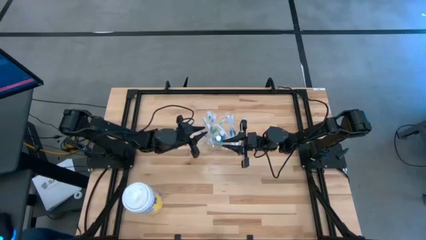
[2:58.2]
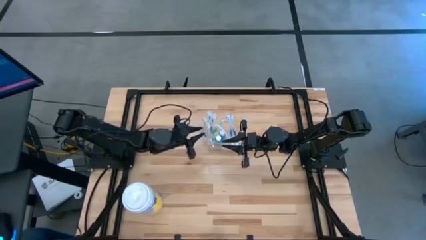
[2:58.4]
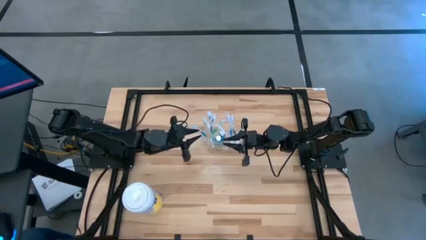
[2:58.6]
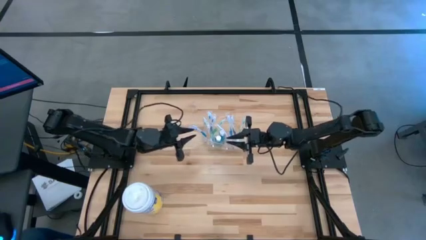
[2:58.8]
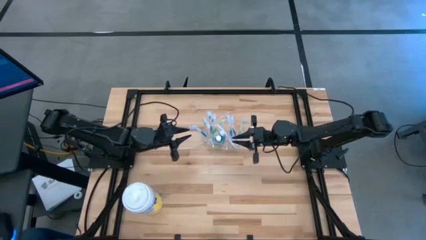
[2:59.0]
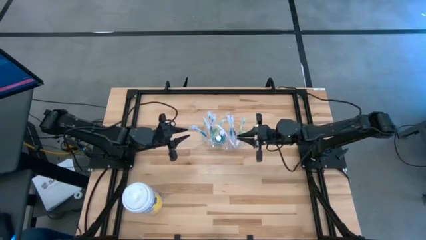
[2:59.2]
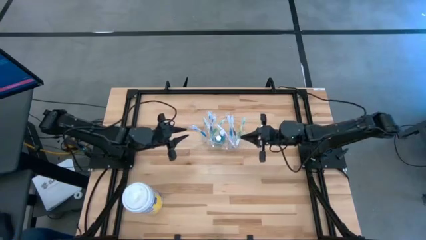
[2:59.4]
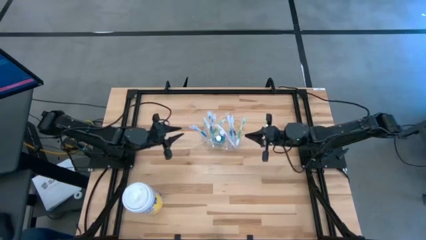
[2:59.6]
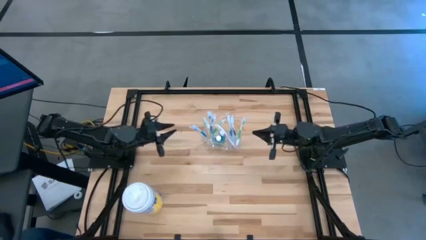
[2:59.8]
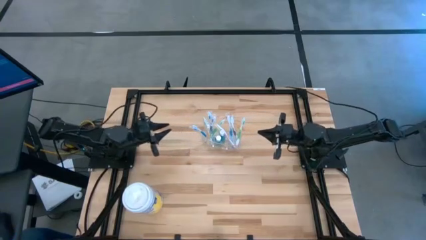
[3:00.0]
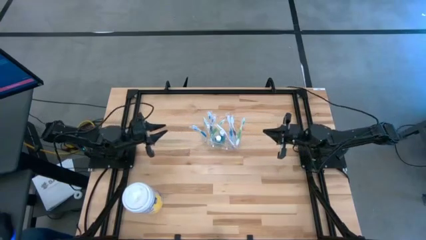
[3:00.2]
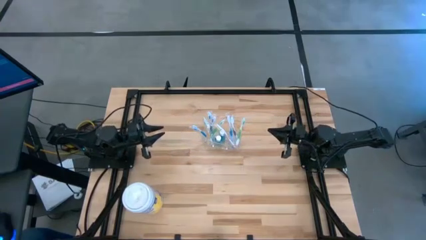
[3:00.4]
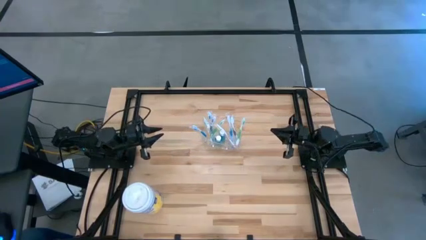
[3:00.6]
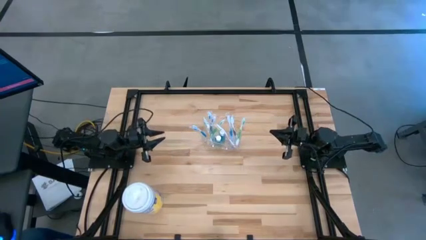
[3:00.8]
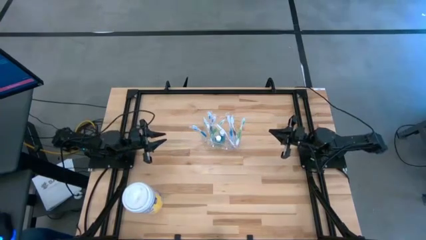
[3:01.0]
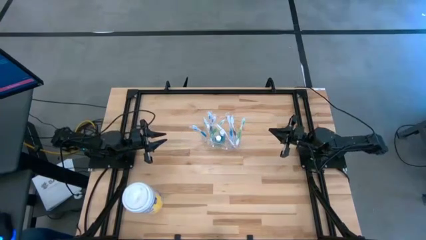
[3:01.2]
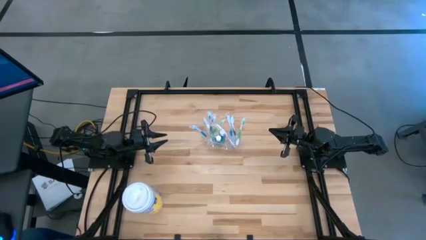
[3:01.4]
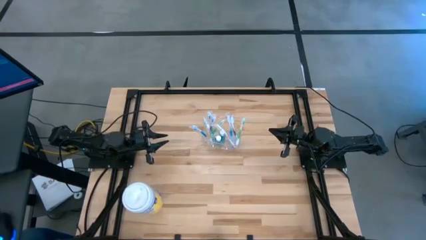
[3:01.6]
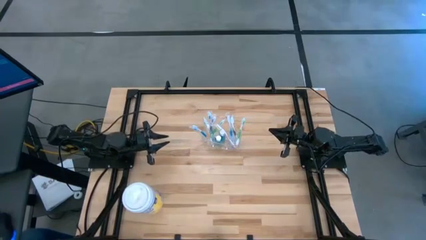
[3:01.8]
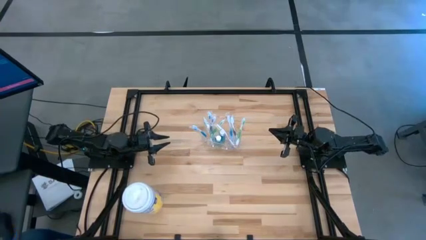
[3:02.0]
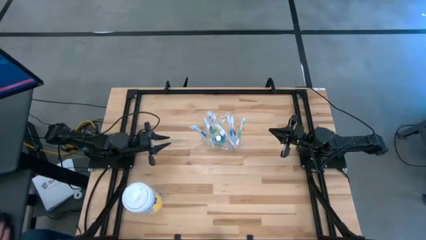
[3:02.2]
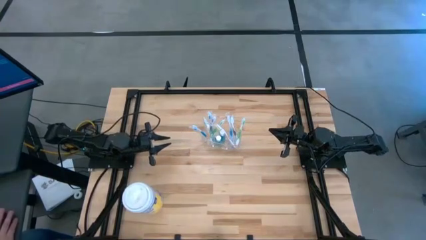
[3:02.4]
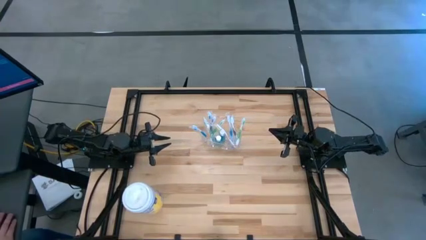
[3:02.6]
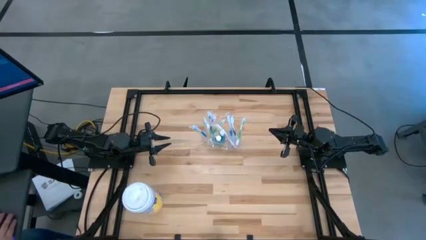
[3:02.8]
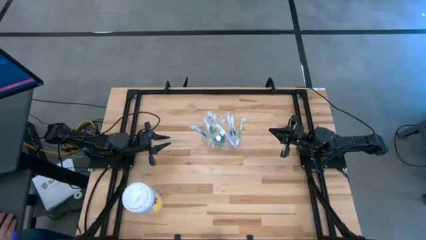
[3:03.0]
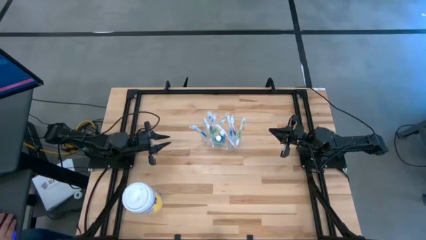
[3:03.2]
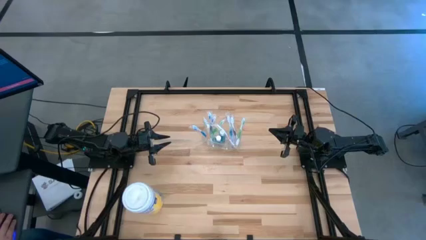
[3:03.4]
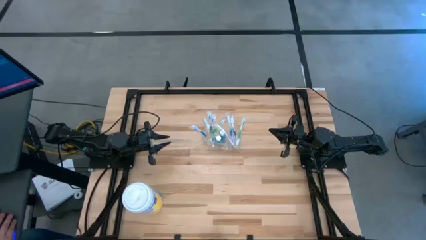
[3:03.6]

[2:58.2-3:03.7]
Task: Pick & Place toothbrushing station
Return to Home Position

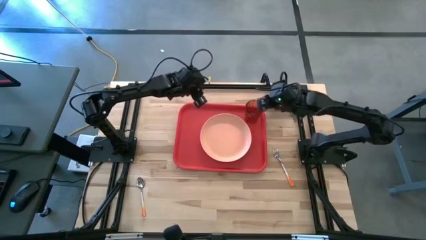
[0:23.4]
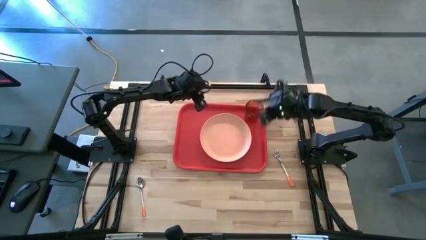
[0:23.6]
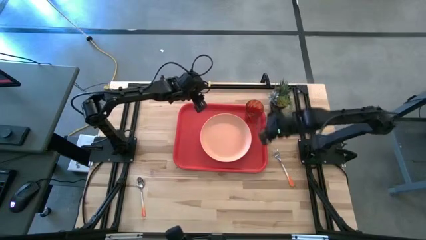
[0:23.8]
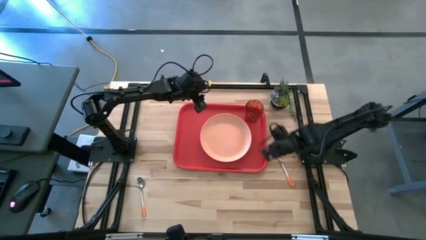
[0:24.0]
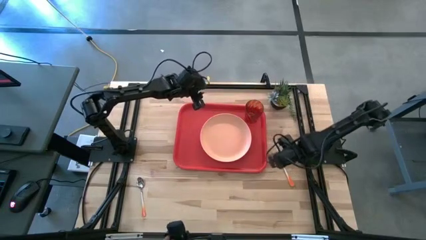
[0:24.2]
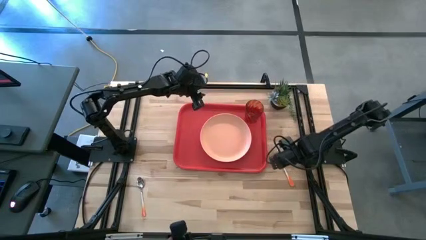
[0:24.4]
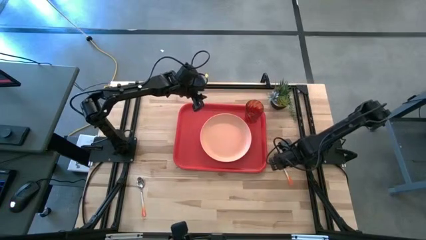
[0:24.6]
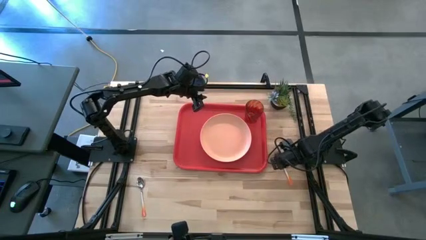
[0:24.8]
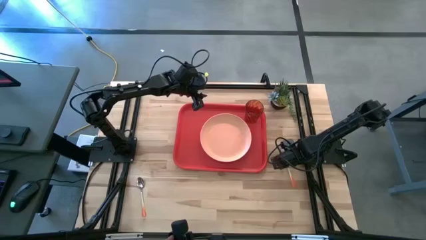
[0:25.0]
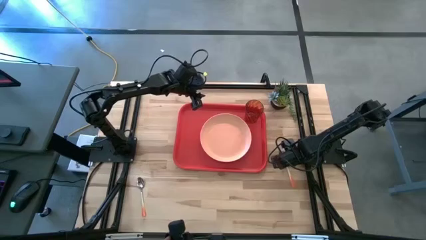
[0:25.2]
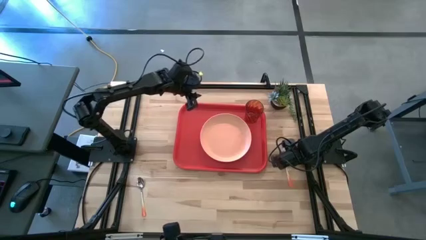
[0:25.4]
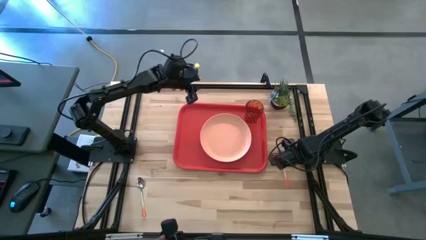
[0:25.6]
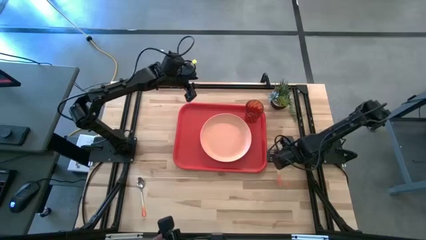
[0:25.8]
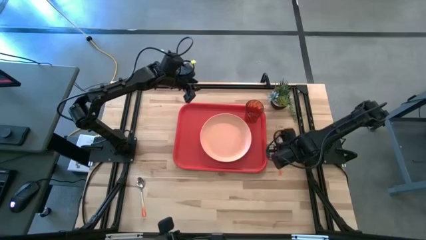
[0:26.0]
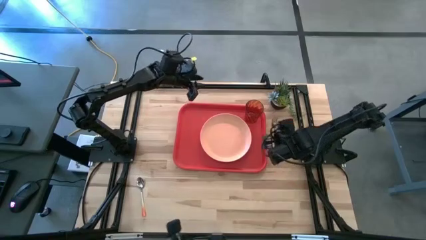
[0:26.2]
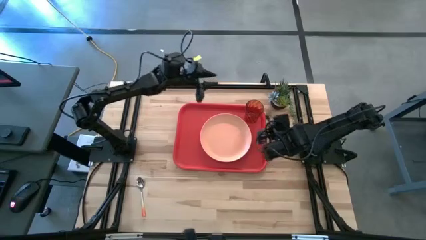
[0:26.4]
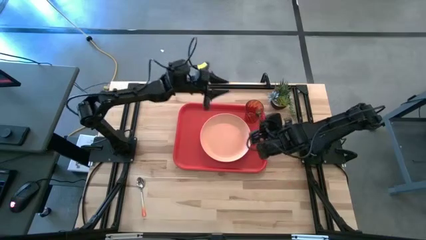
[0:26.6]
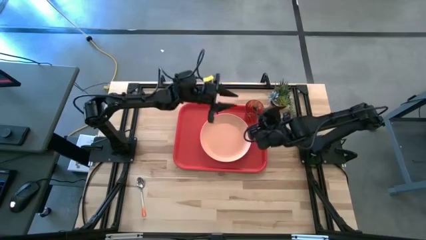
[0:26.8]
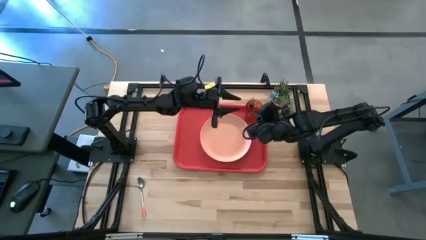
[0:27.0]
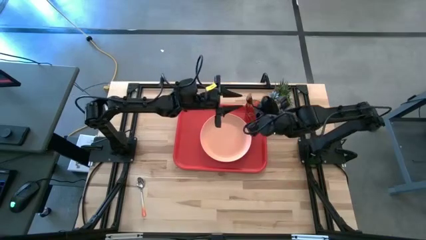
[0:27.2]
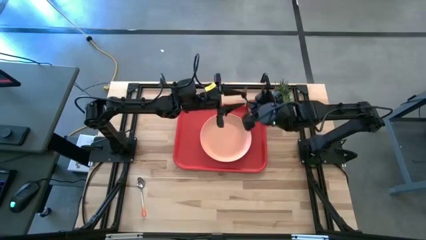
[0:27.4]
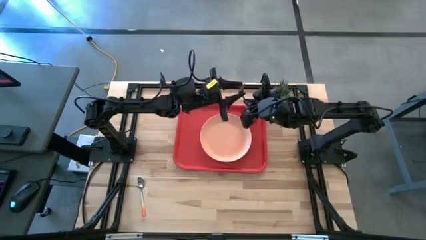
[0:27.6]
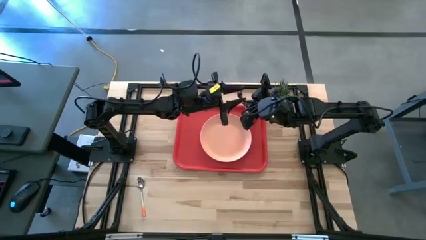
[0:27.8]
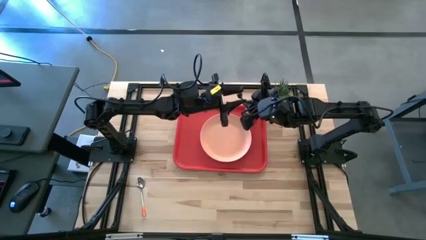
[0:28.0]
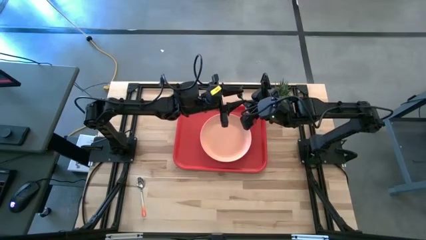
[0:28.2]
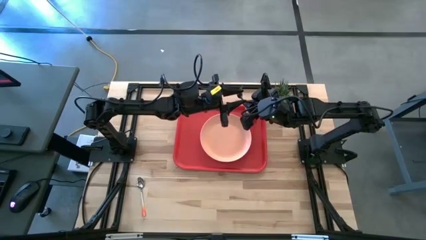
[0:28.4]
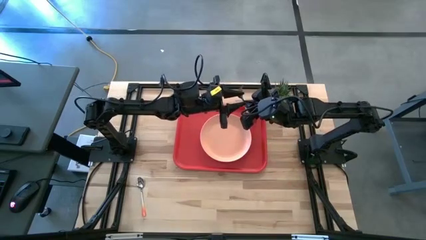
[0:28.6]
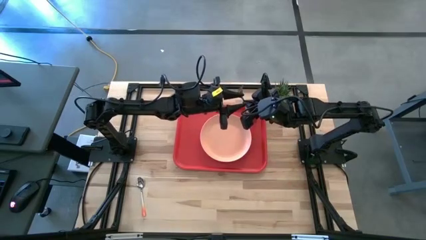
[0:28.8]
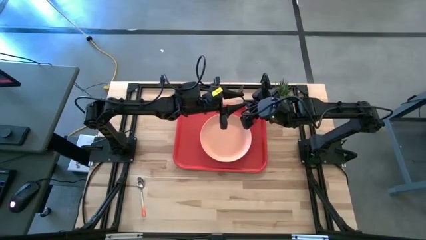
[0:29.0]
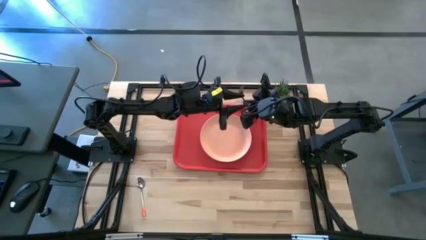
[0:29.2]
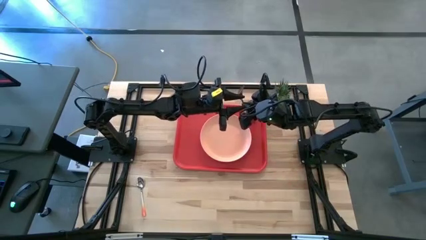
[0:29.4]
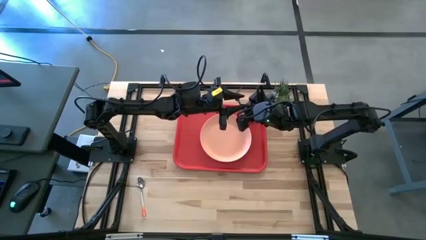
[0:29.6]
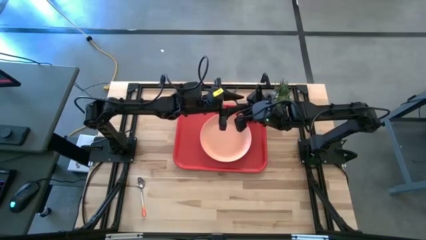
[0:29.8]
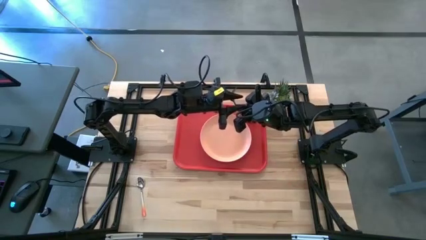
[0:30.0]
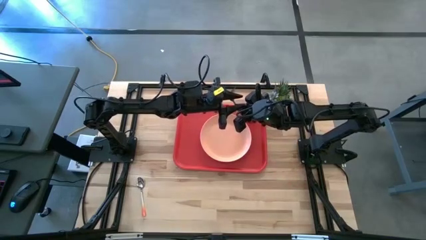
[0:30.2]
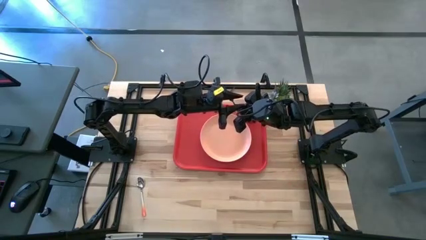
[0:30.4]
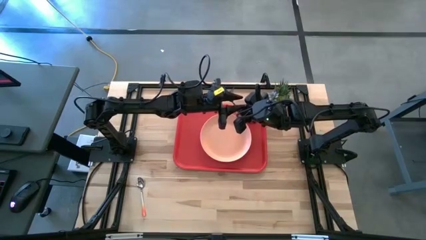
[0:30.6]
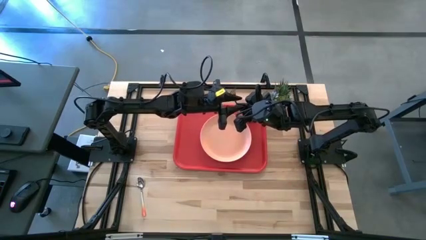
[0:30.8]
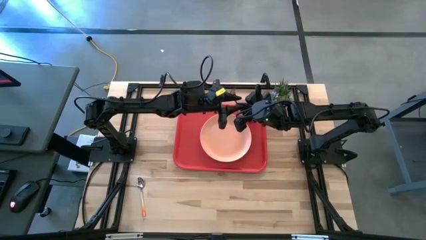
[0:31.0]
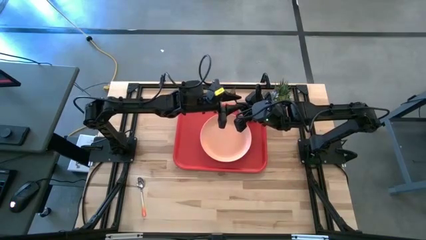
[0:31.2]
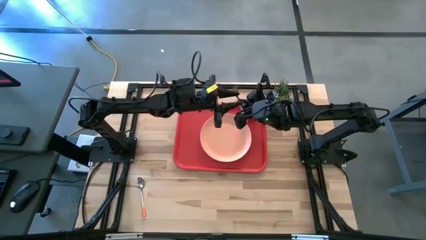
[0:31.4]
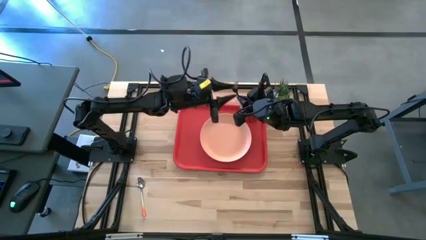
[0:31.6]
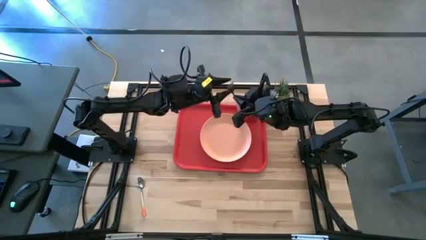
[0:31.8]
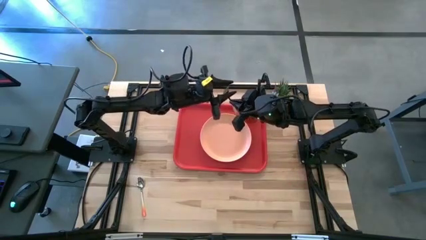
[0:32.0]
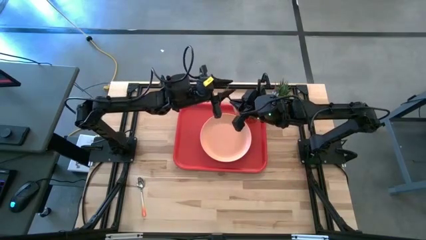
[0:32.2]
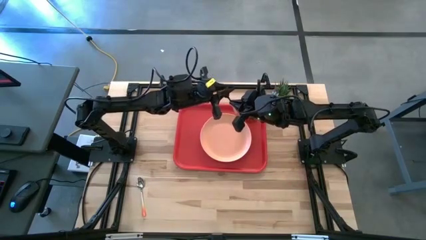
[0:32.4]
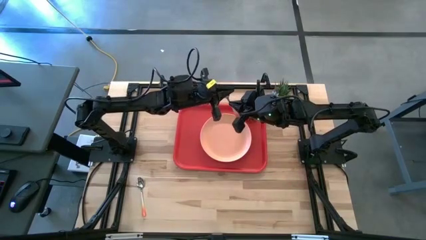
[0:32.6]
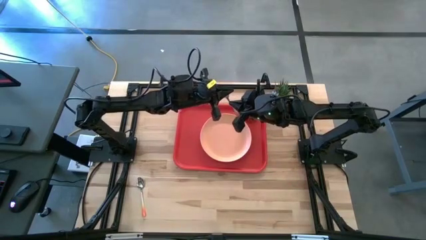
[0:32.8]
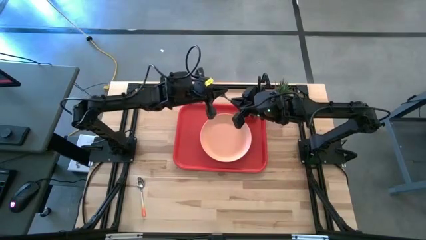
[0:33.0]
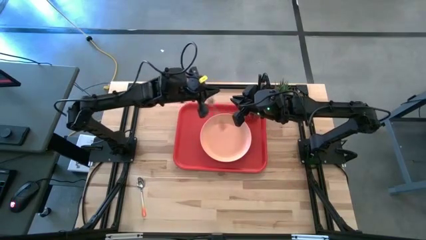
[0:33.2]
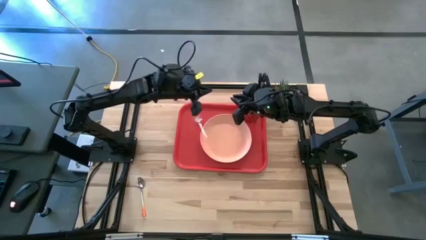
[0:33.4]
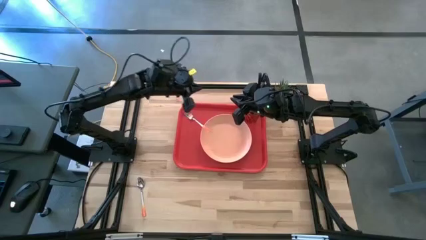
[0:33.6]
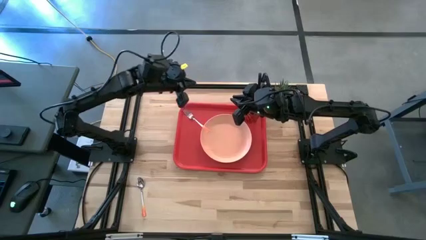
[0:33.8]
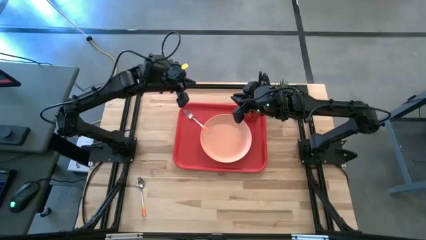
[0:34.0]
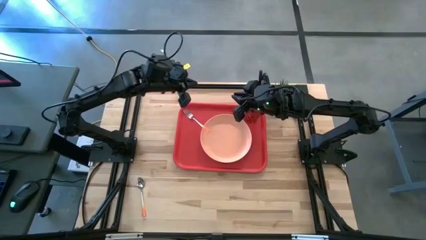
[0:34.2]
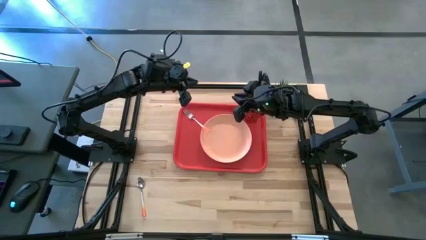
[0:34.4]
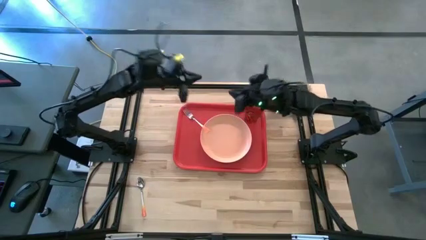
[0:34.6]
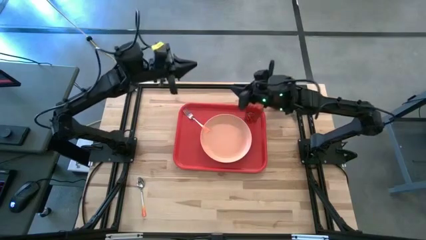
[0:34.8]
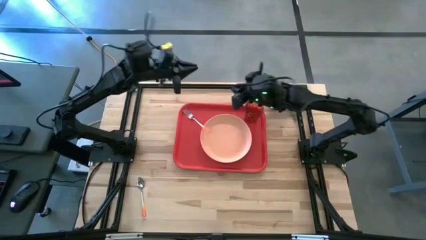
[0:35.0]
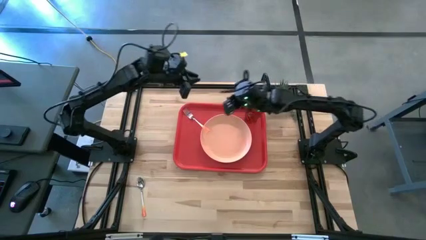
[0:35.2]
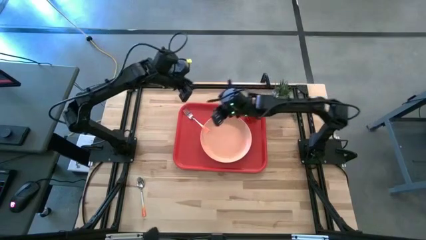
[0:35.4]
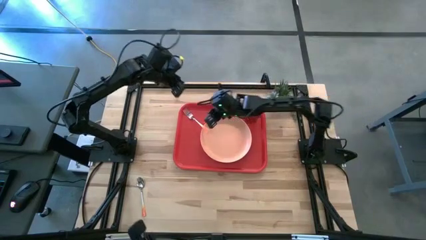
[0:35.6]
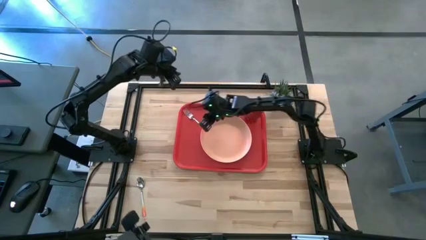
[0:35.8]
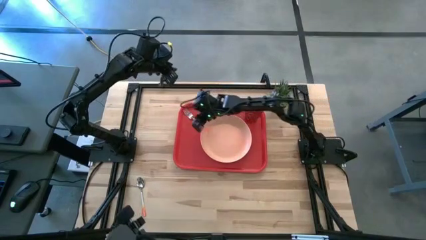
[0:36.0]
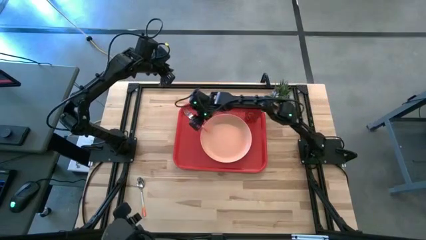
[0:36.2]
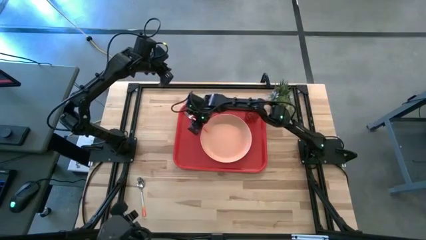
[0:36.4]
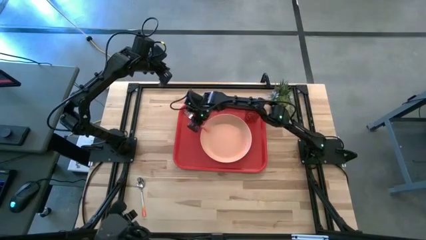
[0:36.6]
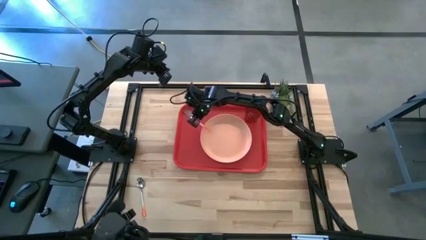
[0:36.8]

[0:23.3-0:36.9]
Task: Pick and place plate/cup/fork/spoon on tray
Put the white orange fork on the left side of the light orange plate
